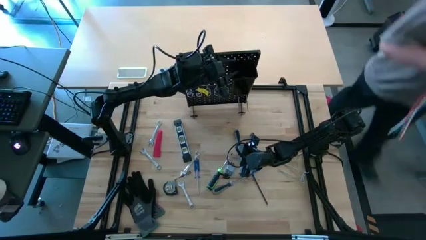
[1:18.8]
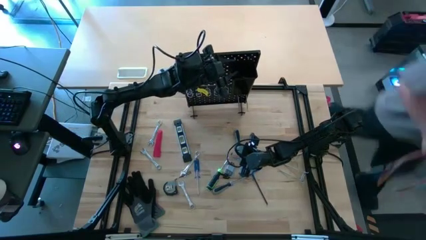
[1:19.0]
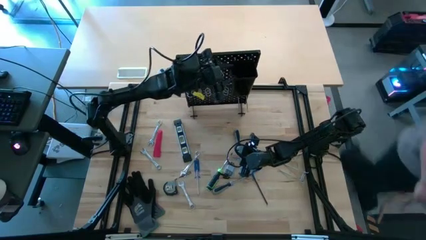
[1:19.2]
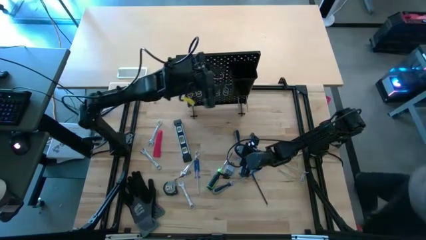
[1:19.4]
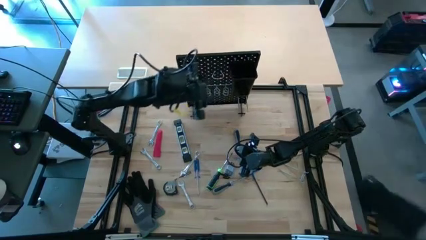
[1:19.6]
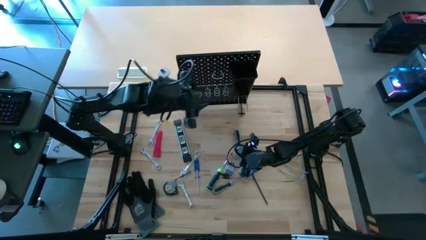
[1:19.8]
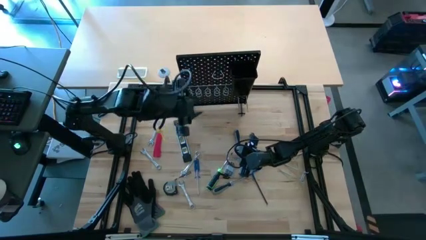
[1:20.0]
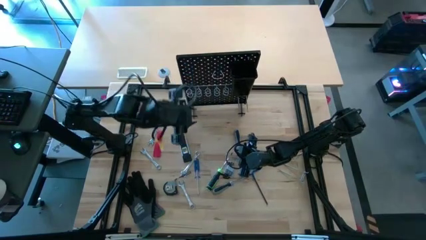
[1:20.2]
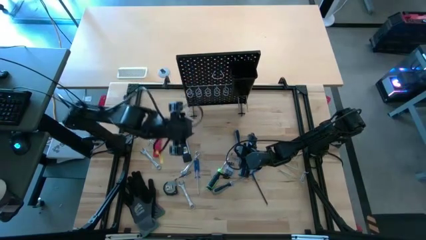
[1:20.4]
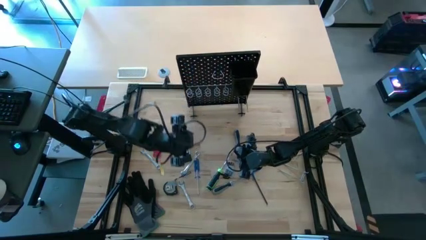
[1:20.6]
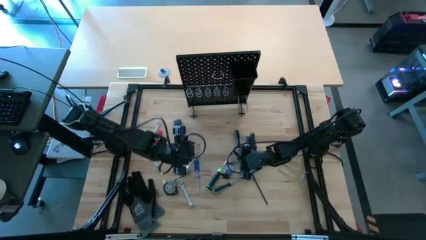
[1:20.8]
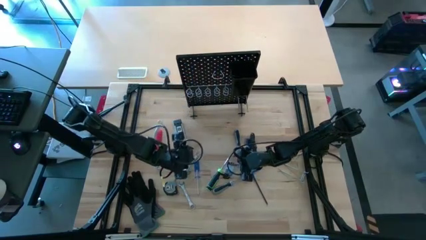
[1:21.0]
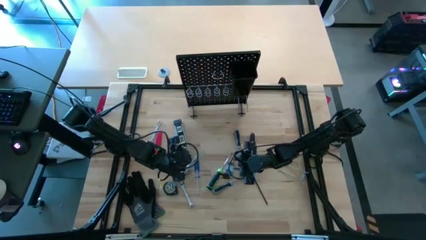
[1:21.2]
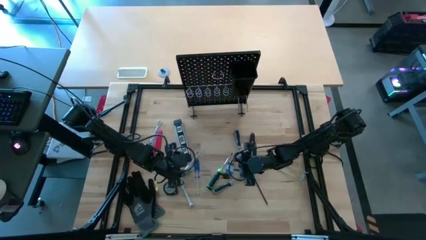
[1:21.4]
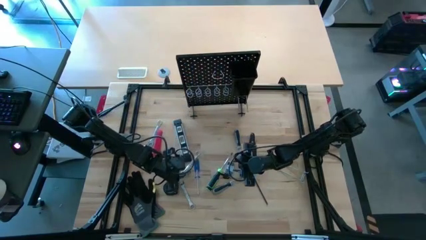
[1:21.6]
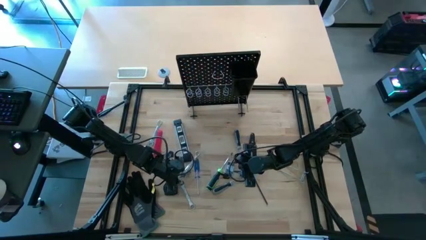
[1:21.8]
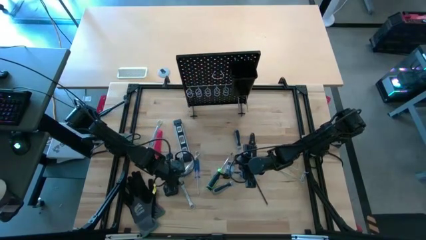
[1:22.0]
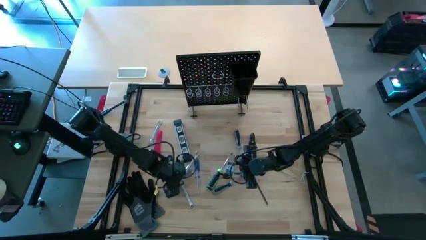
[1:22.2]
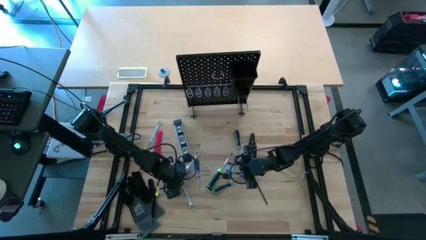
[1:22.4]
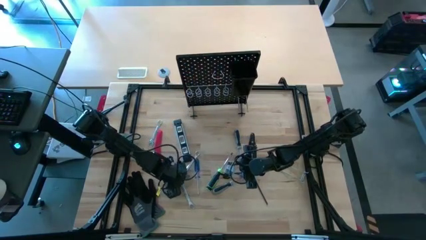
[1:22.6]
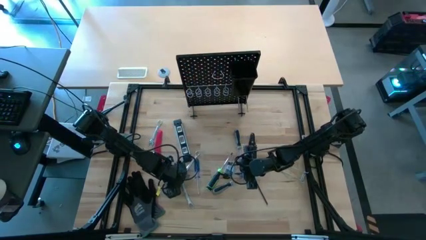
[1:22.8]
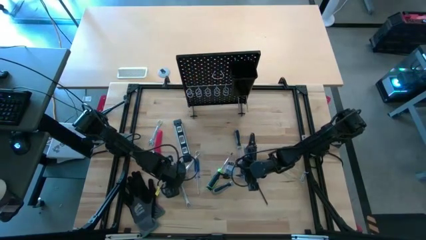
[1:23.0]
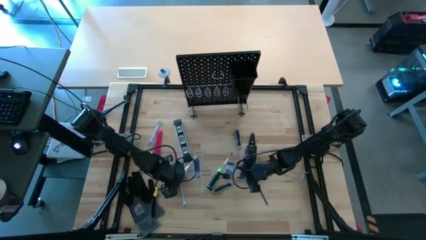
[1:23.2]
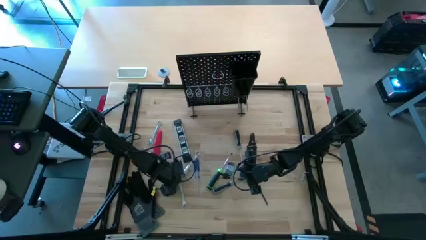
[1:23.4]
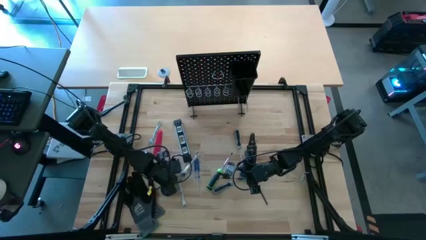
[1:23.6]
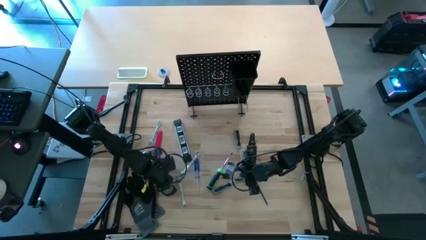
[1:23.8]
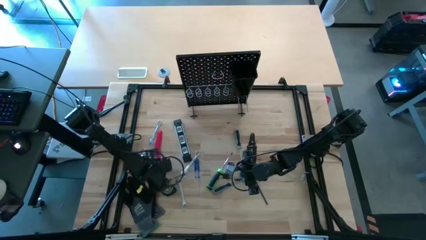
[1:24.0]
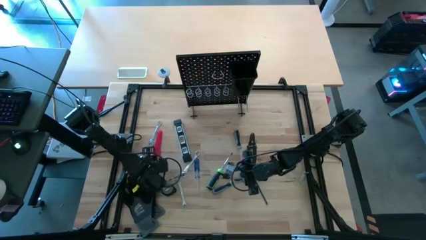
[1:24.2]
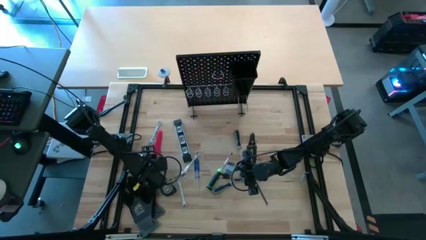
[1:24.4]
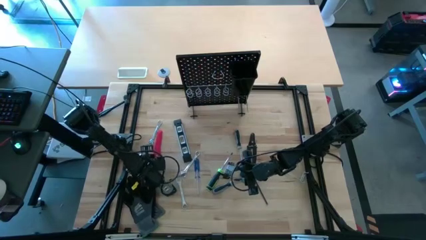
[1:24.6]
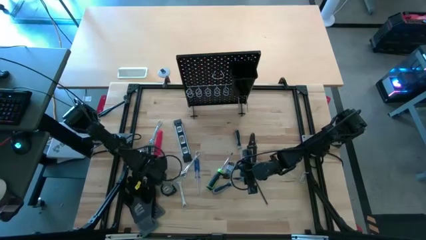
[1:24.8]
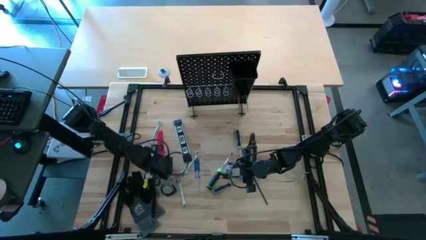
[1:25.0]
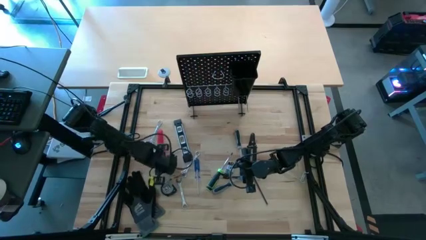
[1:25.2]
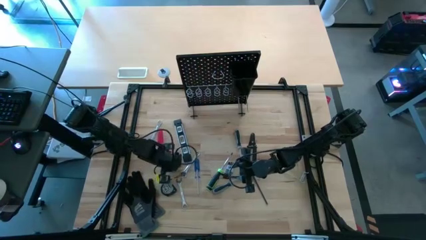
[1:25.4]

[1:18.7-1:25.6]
Task: Hang tools onto peg board
Hang the wrench onto the pegboard

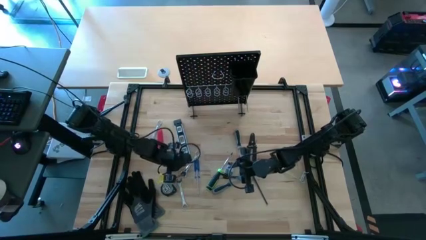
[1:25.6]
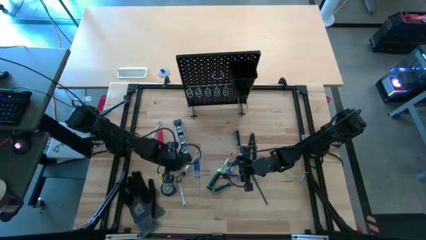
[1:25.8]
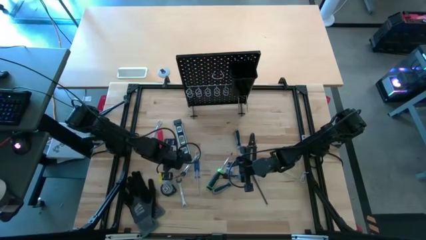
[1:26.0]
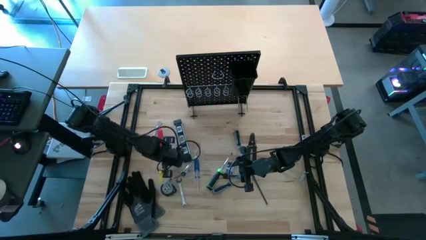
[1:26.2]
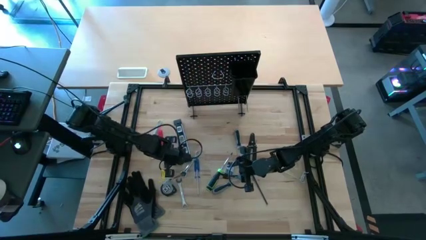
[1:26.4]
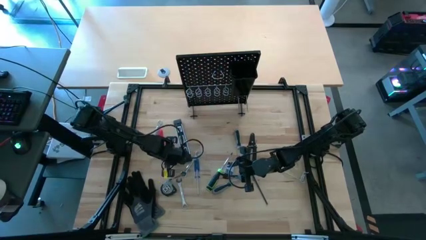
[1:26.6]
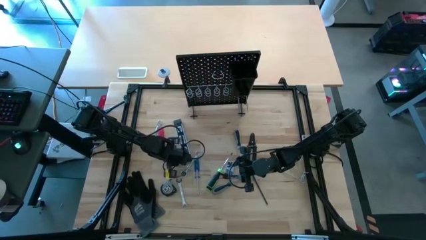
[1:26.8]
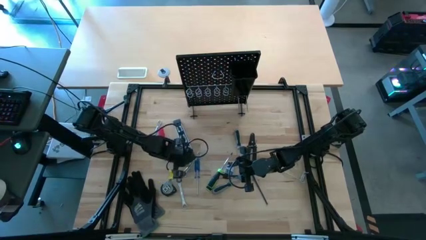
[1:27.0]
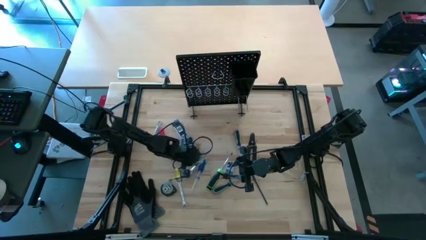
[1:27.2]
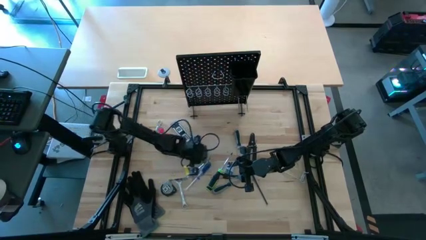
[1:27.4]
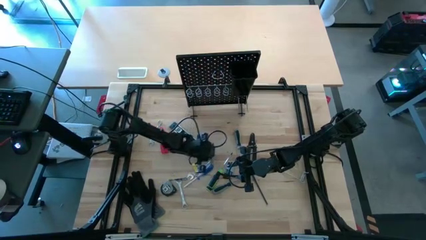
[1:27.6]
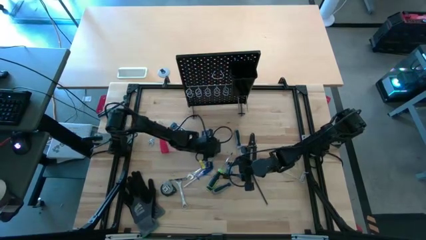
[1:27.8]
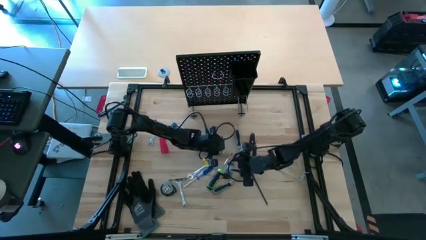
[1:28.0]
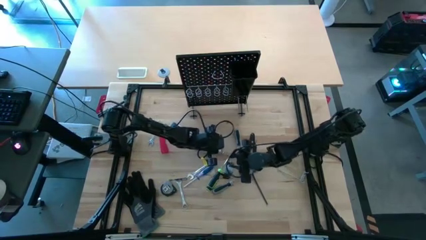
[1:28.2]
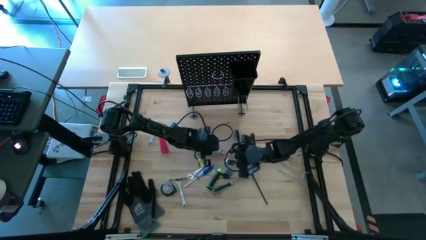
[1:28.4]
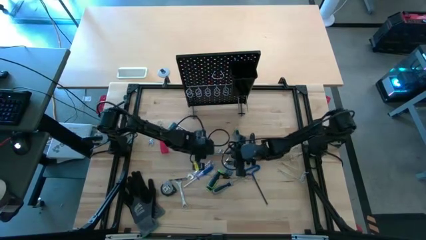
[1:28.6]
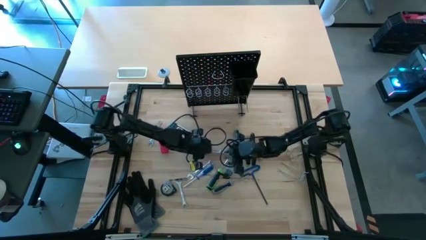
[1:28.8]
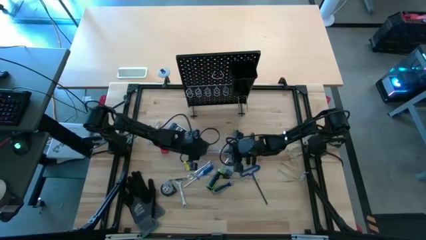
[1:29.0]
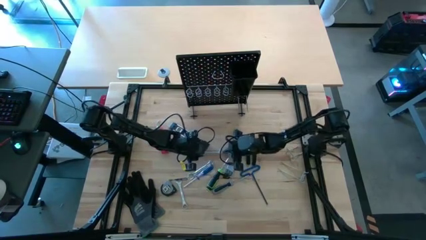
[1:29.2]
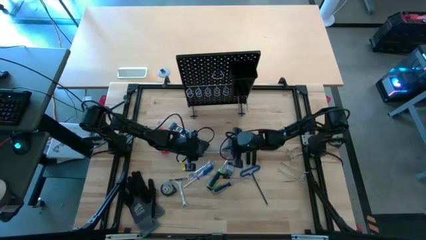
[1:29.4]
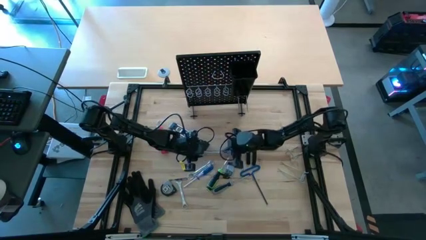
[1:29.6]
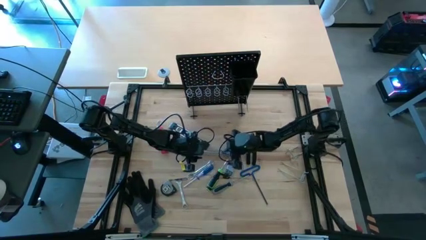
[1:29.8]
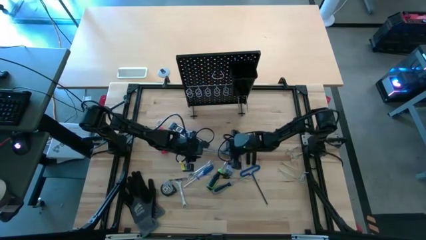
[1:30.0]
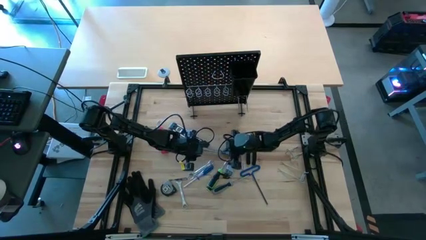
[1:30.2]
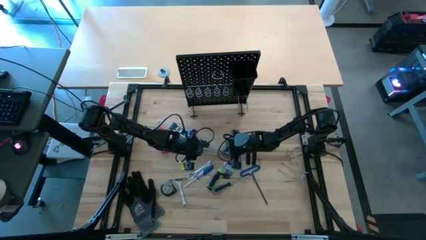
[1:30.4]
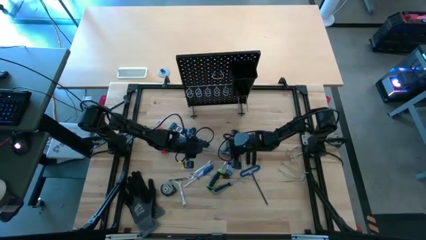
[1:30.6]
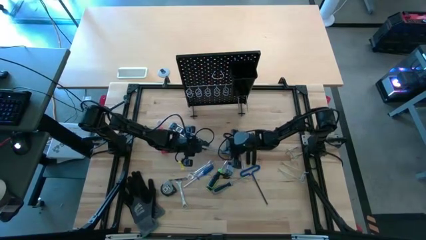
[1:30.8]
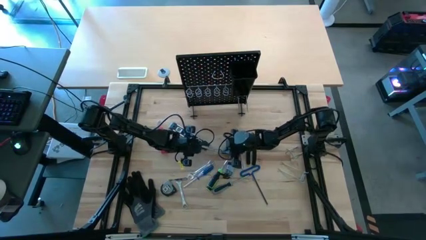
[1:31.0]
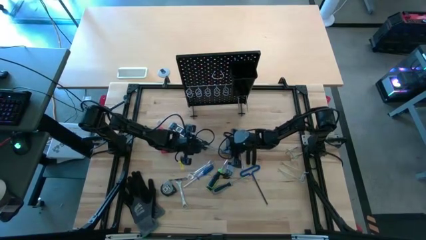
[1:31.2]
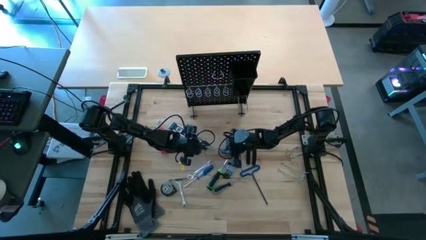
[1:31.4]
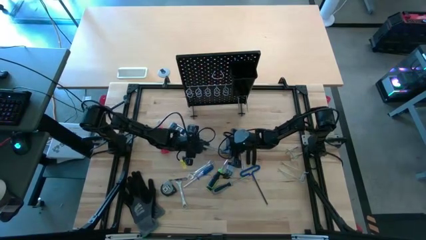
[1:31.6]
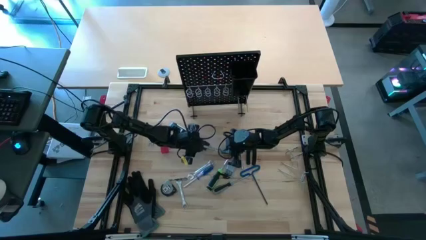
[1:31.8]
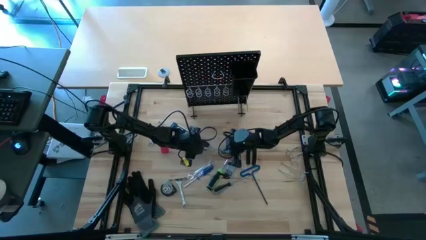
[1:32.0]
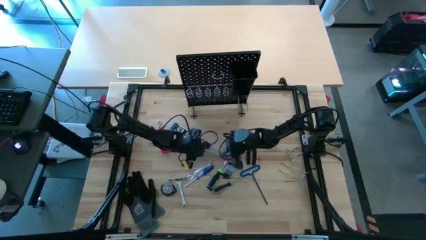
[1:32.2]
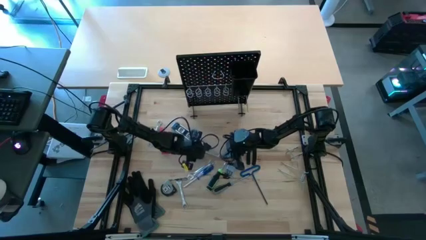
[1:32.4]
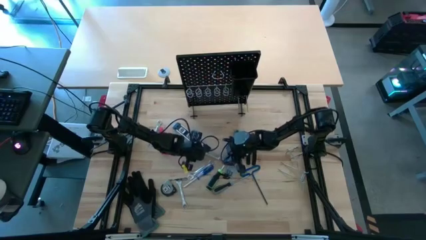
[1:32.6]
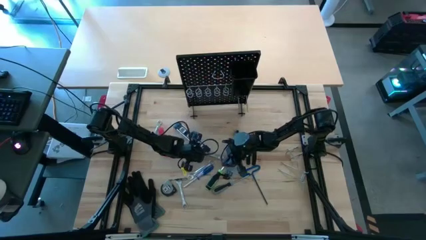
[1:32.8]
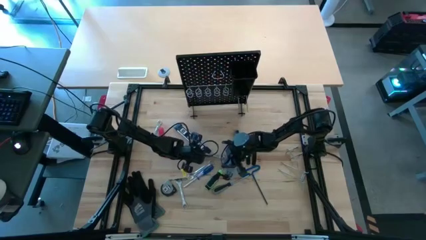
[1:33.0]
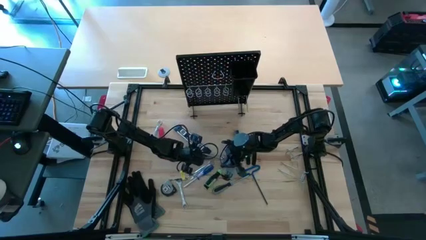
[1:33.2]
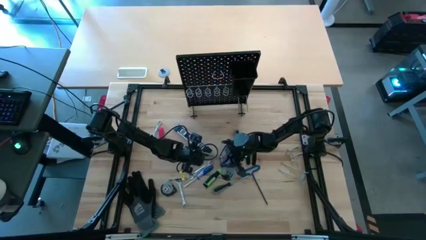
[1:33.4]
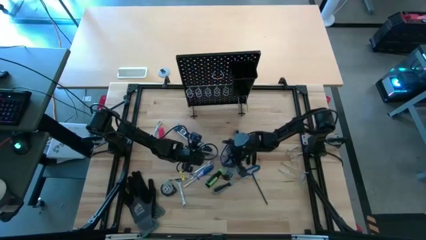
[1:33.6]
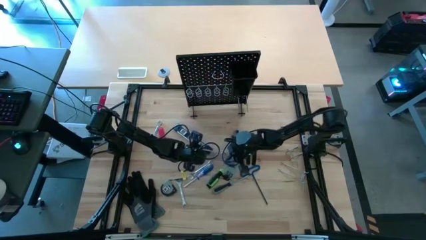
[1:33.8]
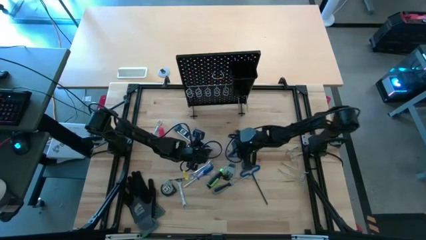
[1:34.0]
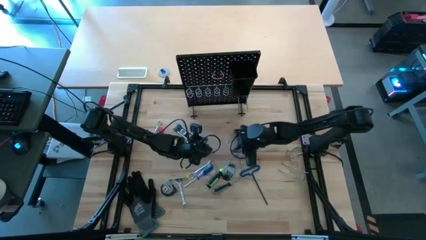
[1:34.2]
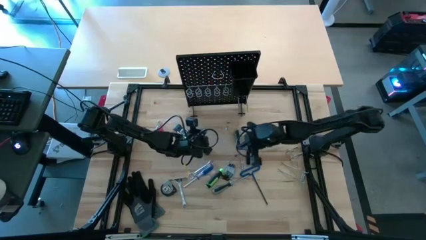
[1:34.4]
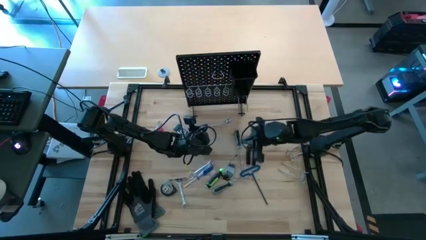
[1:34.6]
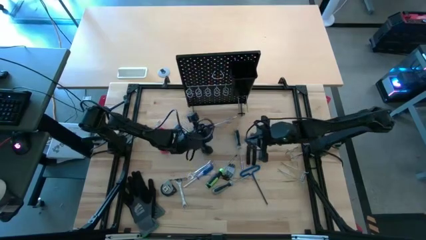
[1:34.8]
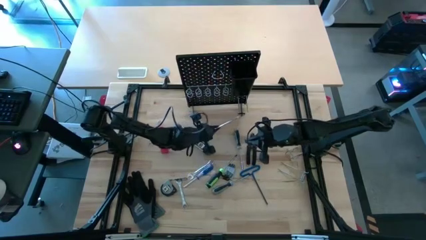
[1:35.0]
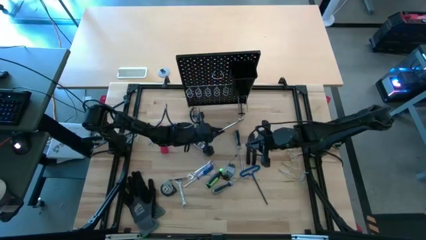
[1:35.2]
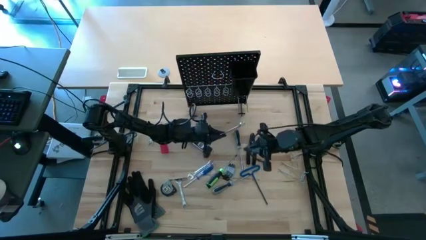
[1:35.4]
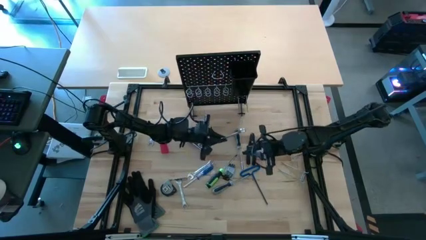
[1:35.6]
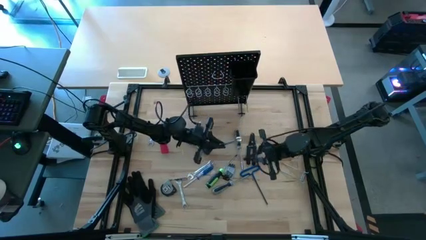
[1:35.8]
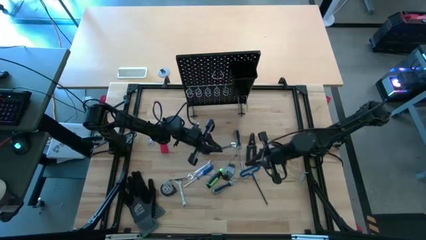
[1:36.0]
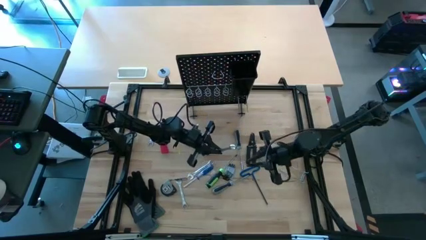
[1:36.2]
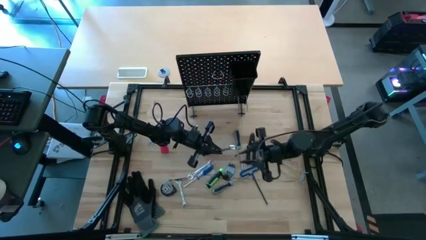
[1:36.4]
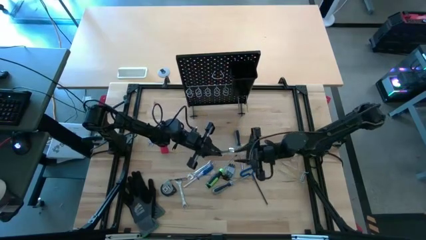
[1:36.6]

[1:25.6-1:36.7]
Hang the wrench onto the pegboard
